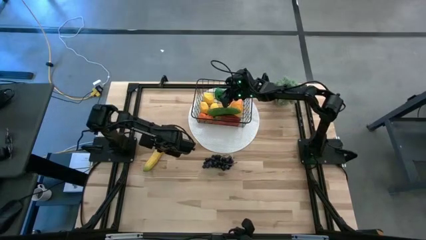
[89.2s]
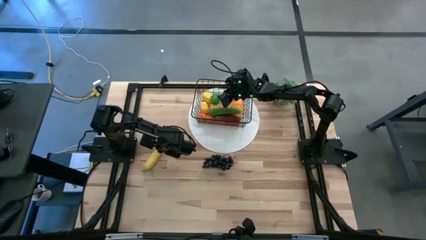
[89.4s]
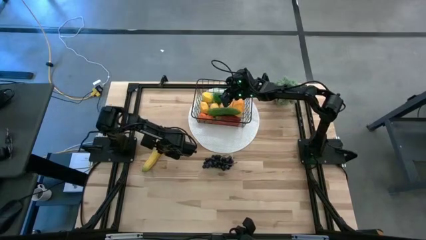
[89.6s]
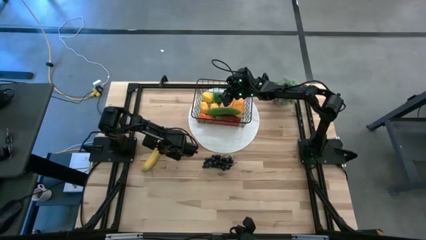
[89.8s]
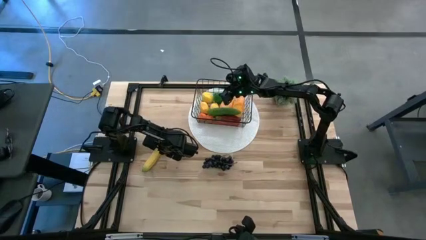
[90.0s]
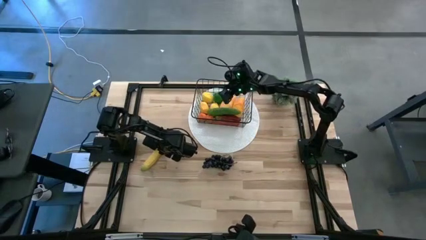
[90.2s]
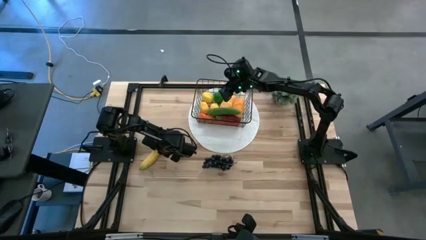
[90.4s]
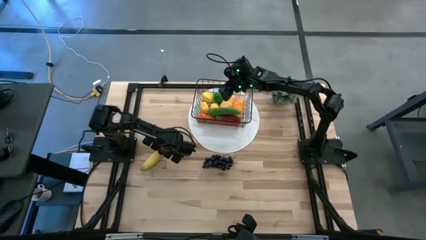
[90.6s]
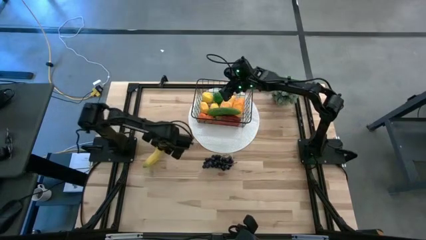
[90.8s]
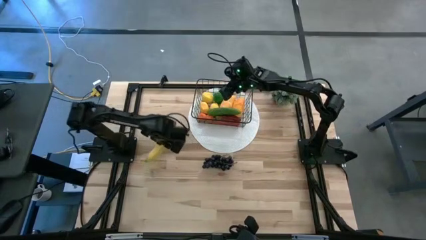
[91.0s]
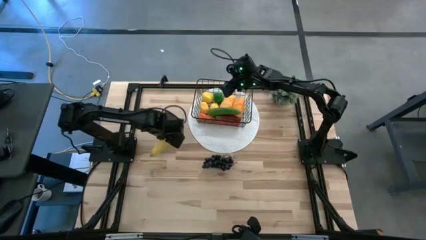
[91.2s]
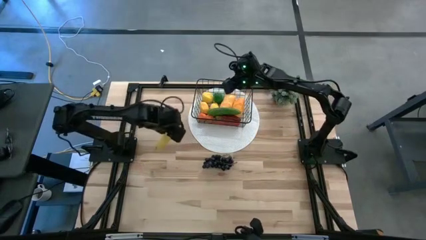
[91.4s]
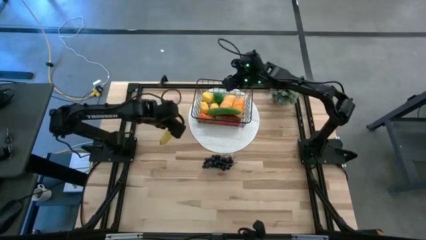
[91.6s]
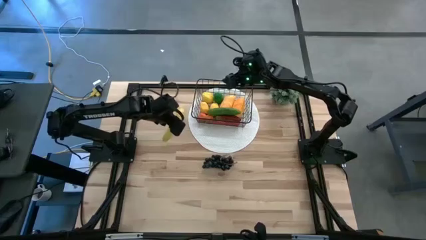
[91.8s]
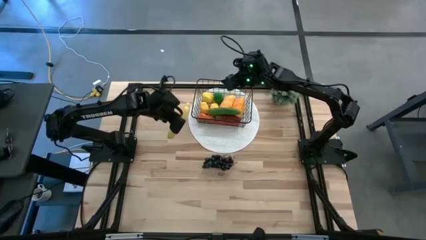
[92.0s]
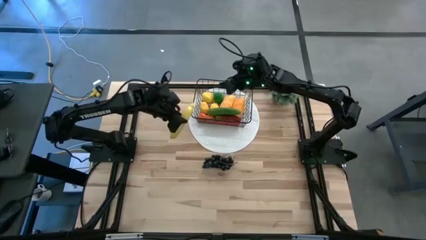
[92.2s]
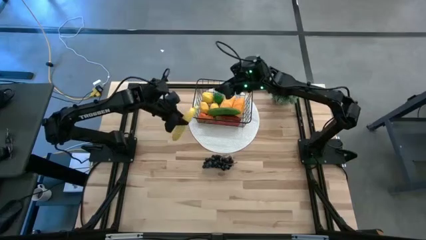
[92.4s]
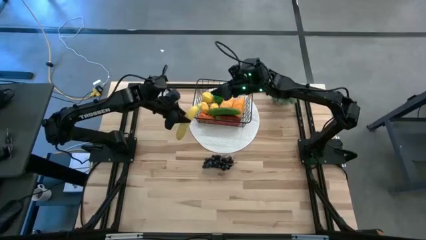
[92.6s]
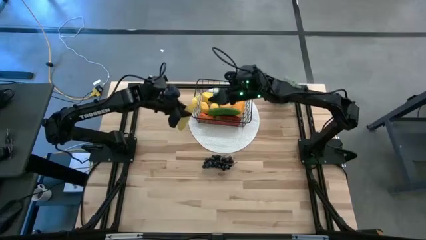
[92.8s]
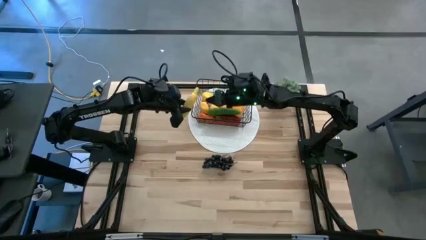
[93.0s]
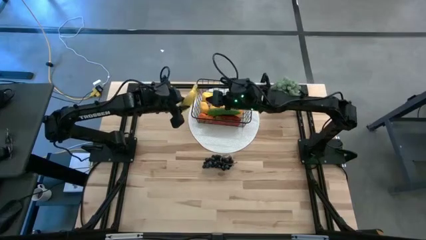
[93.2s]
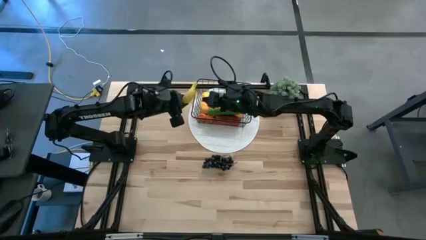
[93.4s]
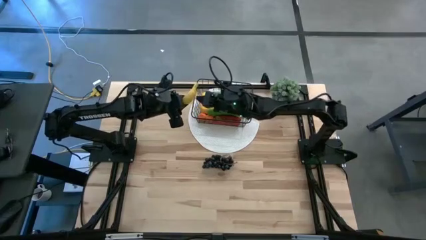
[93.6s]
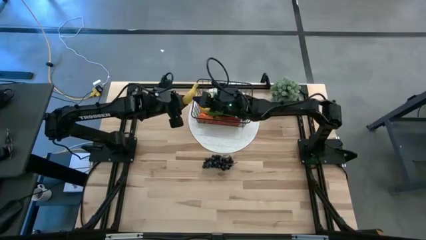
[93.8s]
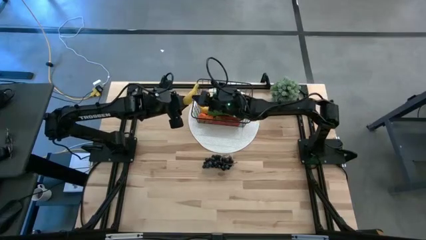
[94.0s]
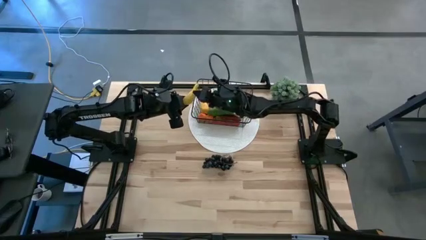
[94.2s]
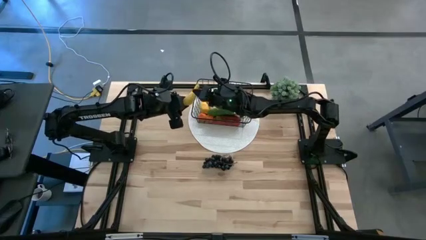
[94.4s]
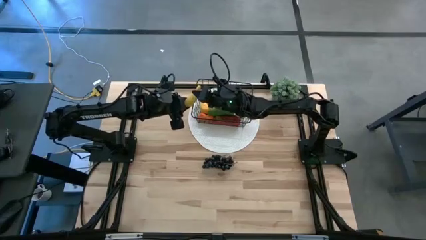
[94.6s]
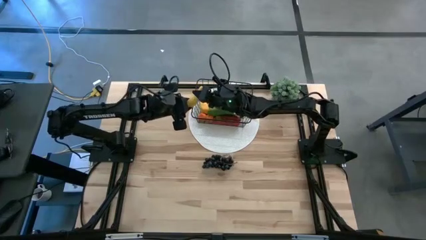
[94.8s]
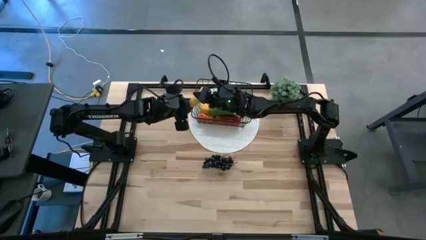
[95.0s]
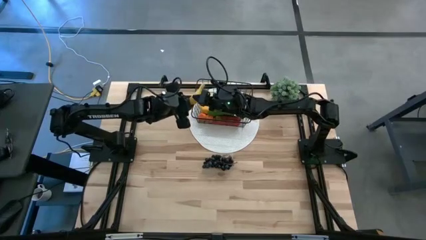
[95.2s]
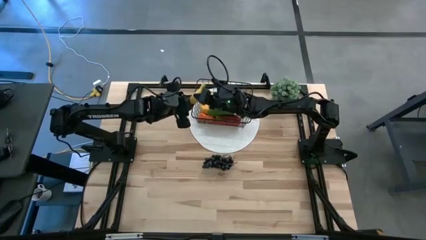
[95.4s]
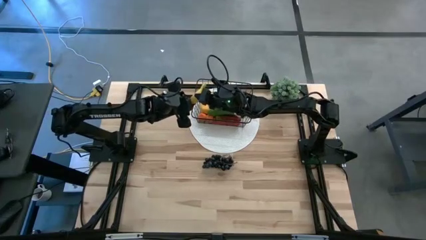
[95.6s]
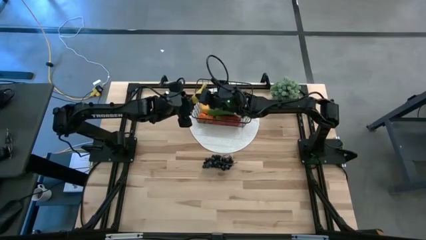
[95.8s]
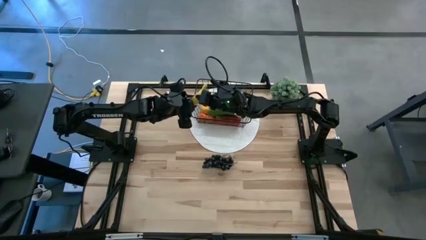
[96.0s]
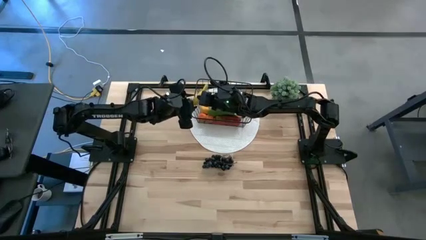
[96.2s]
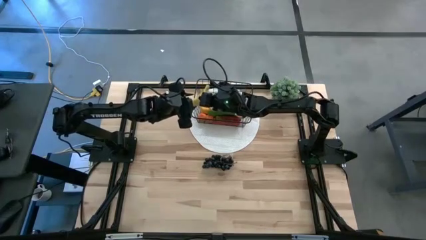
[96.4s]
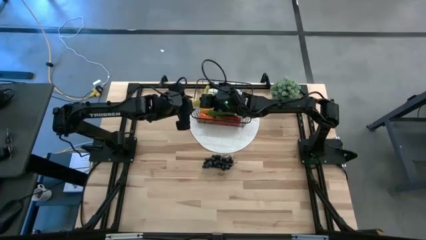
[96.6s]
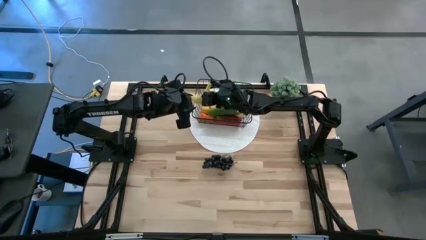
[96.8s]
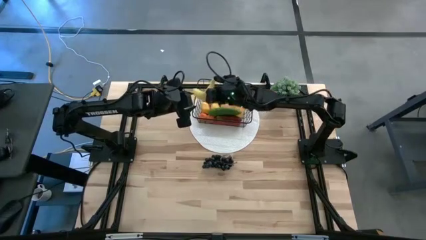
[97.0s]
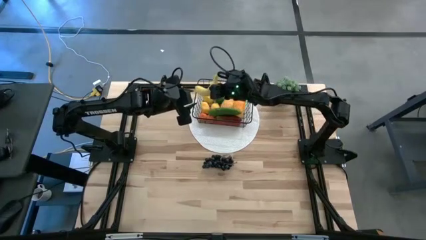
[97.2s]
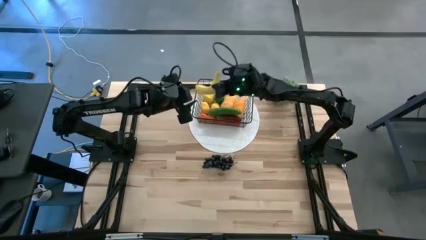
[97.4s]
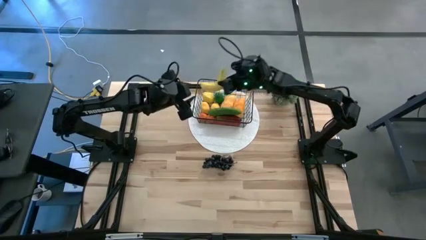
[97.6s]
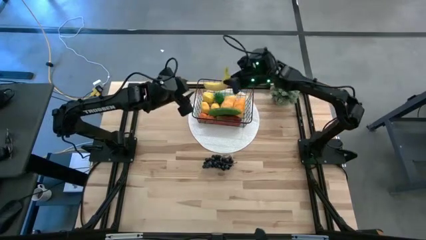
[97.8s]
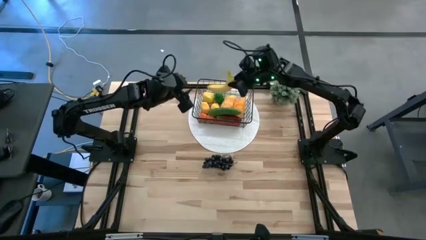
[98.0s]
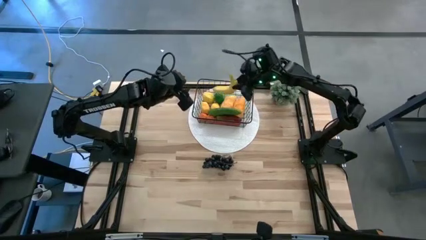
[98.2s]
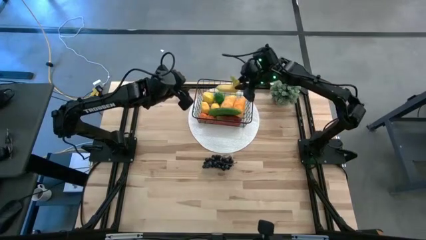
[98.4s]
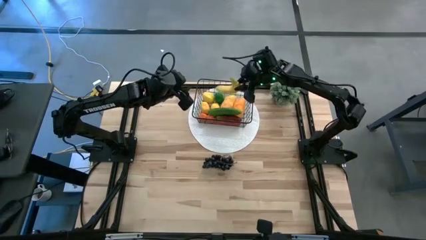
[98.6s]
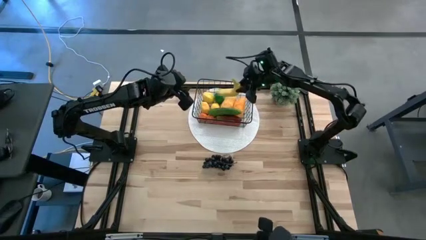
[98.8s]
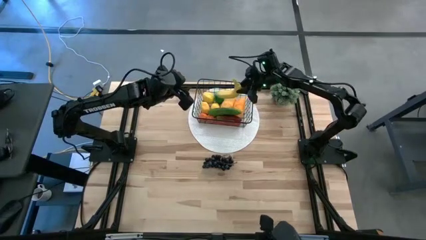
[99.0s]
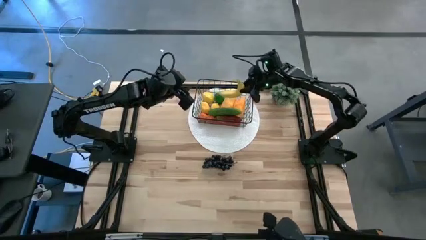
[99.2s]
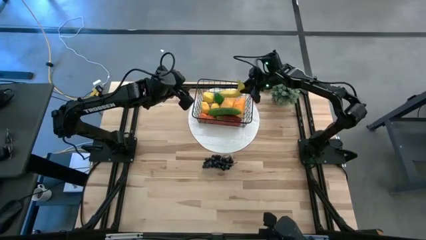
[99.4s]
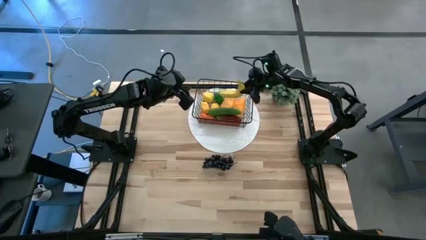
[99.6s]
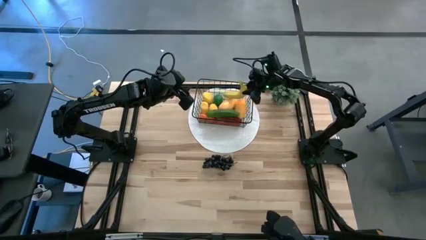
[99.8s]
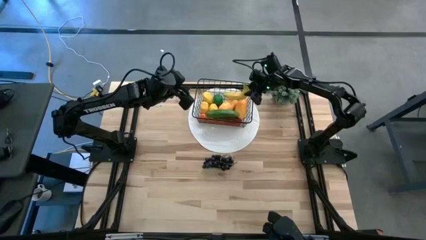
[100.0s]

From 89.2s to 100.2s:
Task: Build produce basket
Put the banana into the mesh basket

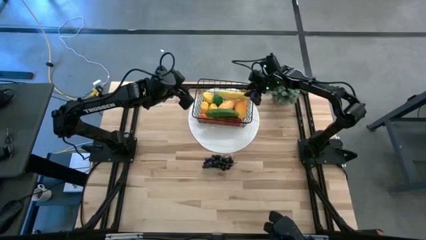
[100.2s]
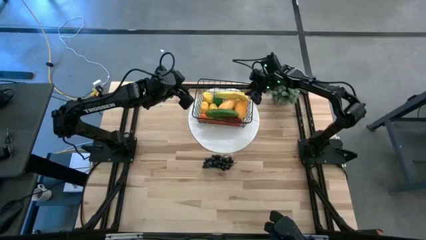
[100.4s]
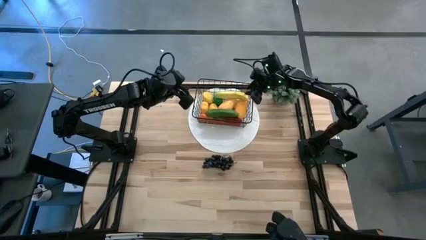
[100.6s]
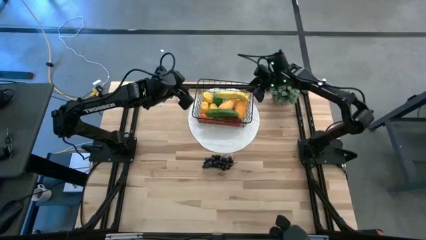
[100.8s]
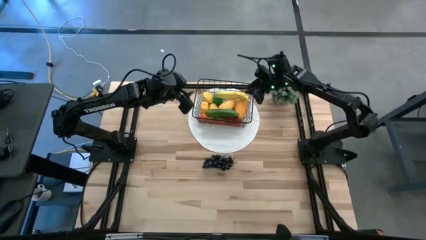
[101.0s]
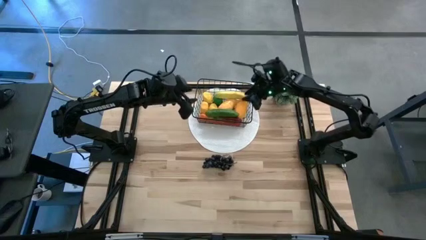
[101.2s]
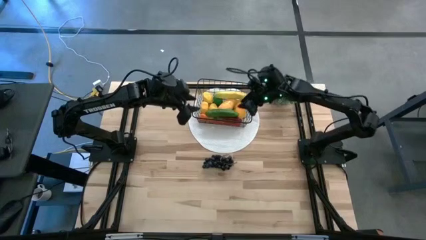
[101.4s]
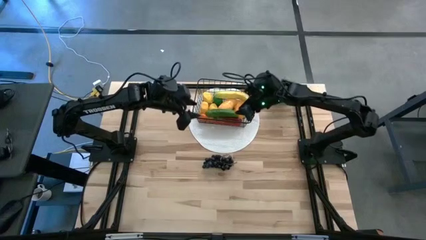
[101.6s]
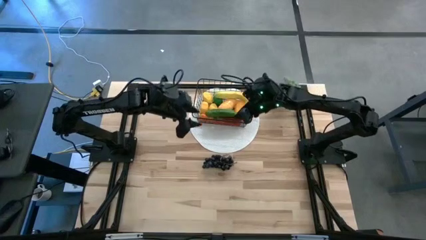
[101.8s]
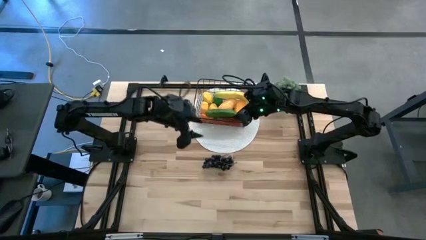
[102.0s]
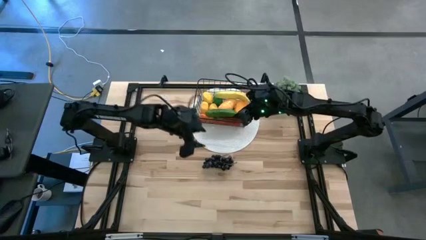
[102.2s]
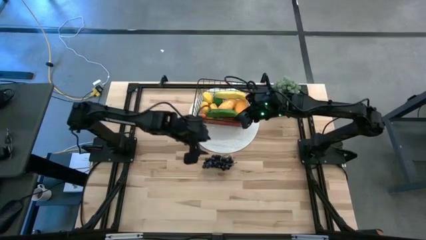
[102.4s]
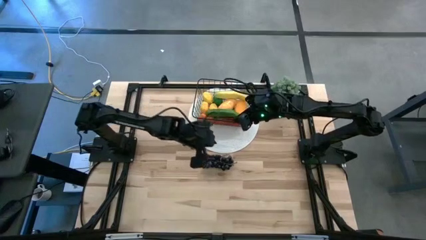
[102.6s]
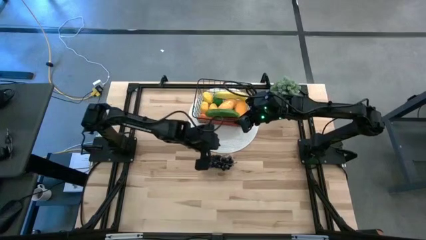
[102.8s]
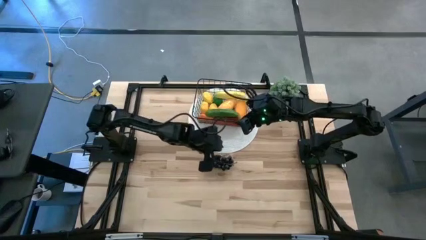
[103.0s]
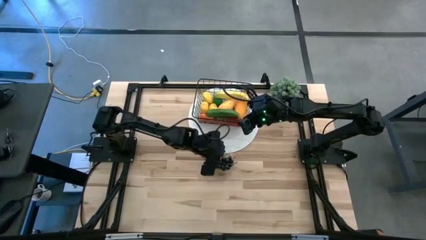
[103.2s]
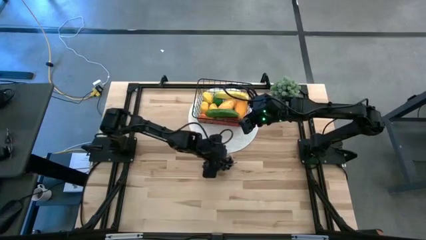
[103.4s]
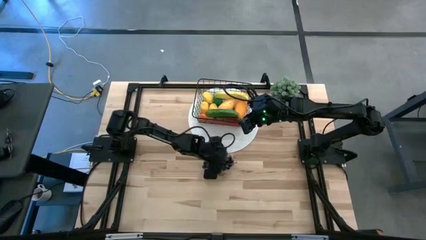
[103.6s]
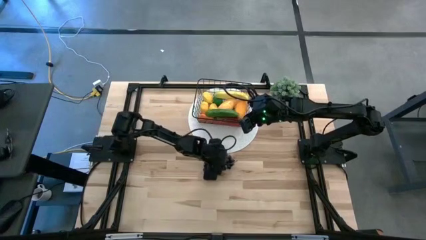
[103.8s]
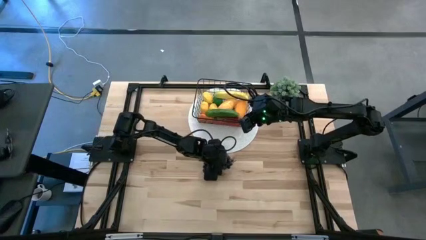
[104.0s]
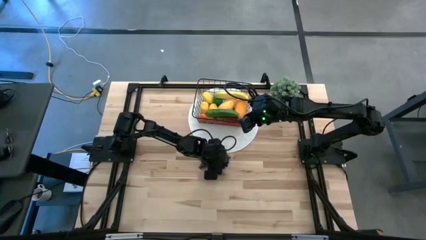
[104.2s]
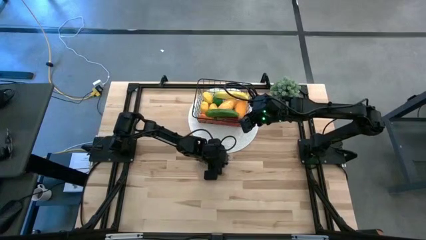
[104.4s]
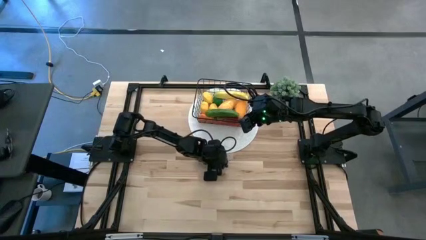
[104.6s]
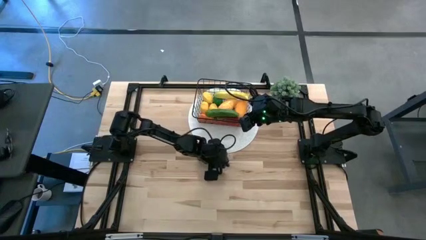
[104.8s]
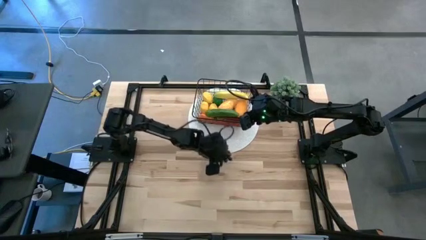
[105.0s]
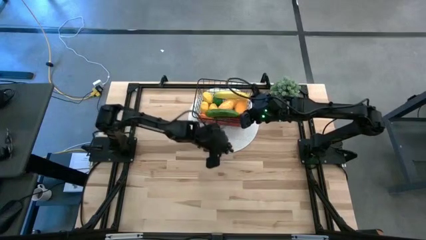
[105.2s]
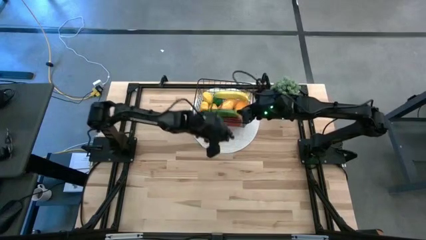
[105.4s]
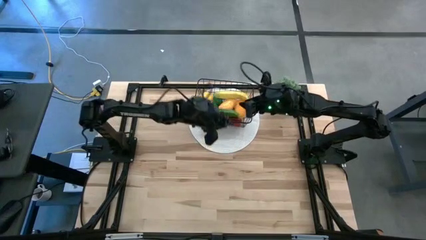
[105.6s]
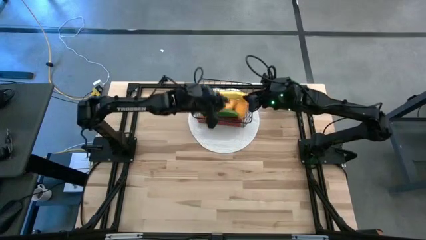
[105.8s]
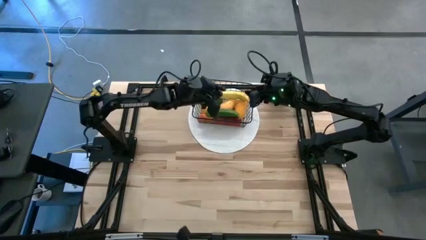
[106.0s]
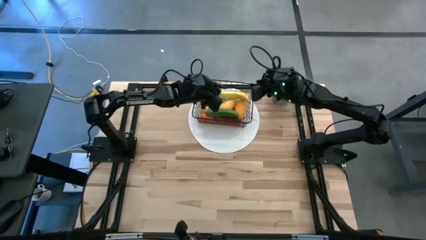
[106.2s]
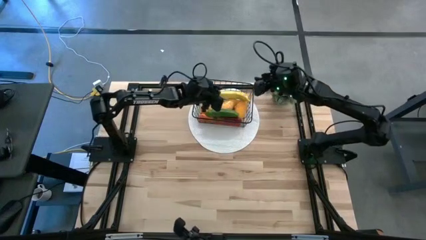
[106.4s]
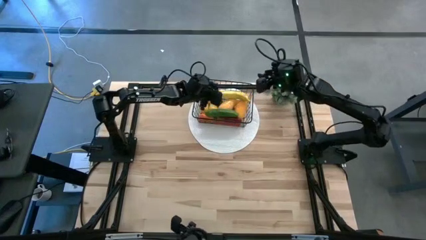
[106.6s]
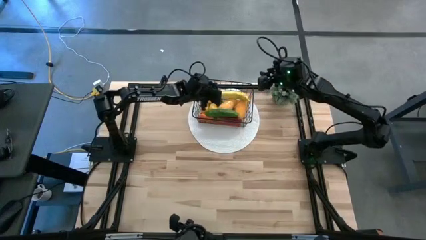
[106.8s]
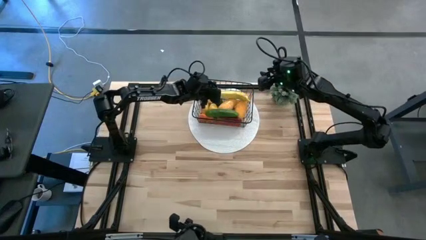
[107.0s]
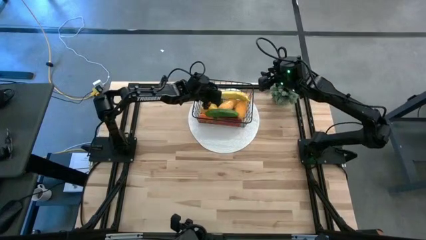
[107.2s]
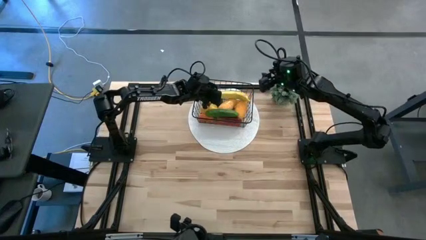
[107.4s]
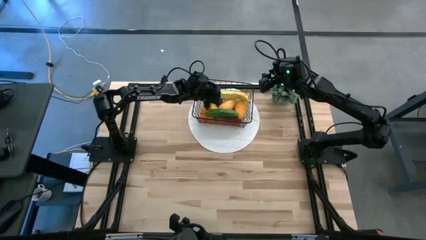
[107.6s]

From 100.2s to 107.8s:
Put the grapes into mesh basket
